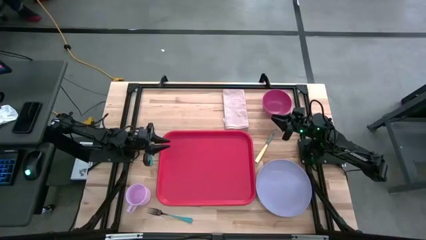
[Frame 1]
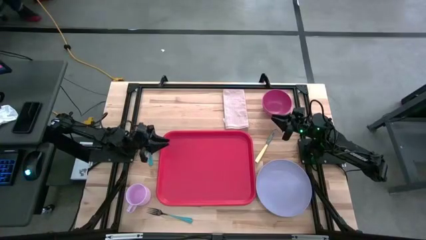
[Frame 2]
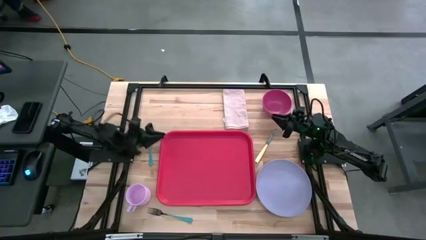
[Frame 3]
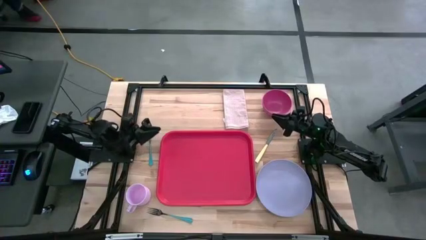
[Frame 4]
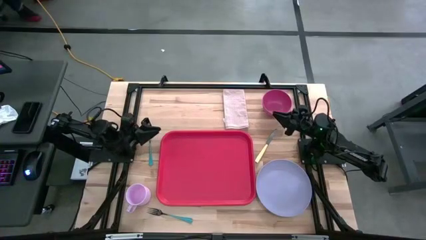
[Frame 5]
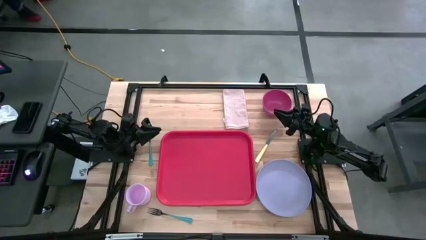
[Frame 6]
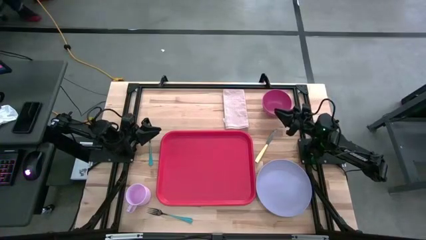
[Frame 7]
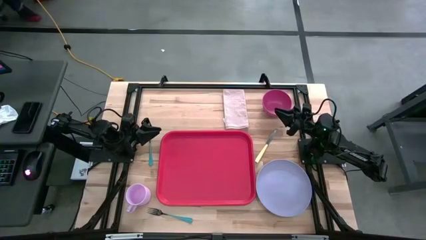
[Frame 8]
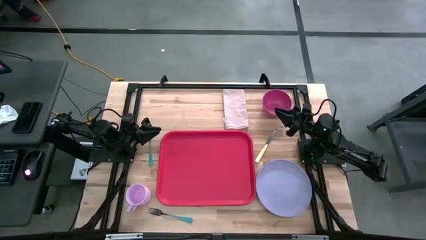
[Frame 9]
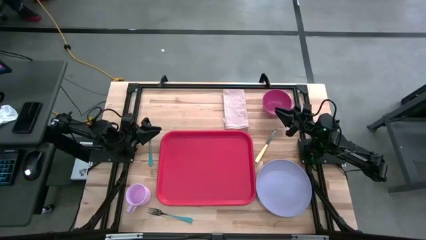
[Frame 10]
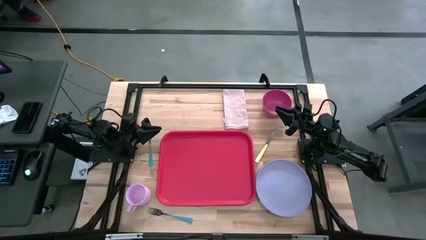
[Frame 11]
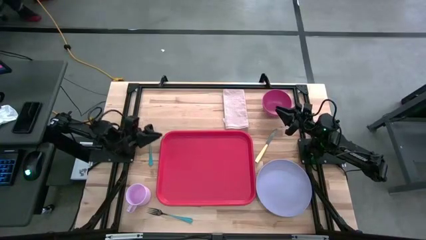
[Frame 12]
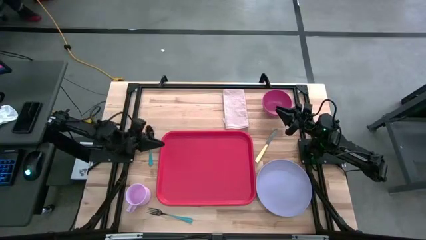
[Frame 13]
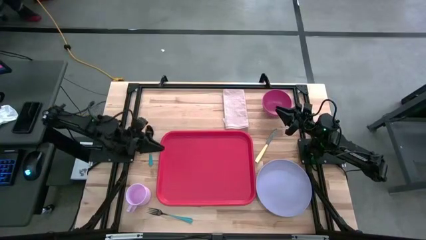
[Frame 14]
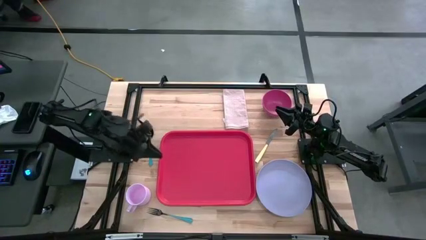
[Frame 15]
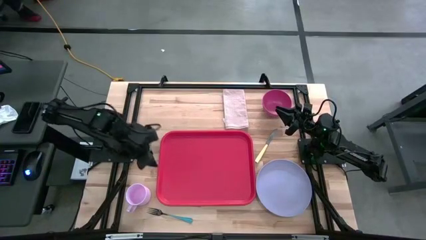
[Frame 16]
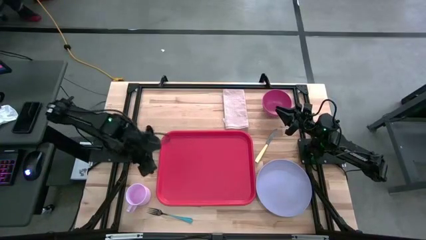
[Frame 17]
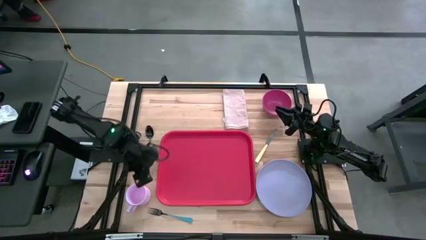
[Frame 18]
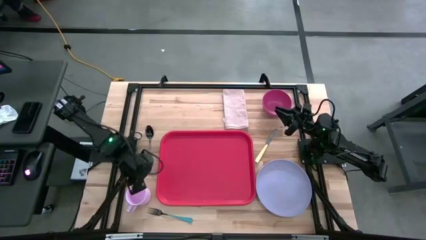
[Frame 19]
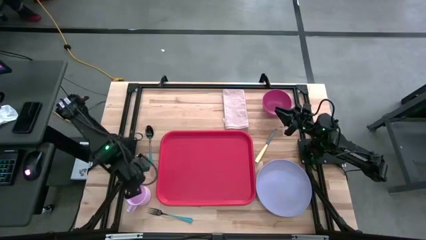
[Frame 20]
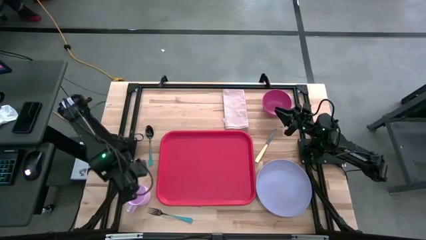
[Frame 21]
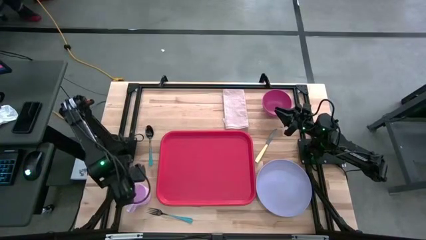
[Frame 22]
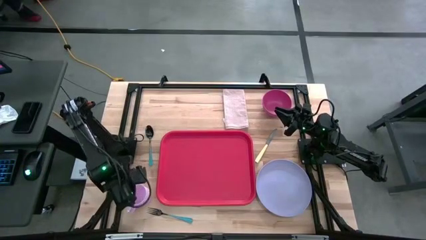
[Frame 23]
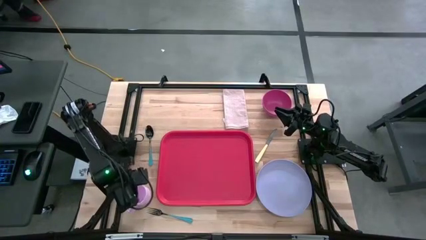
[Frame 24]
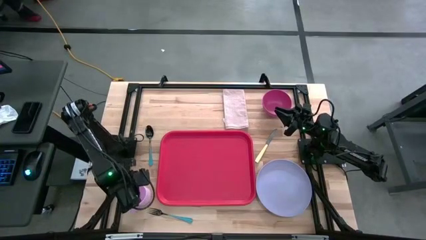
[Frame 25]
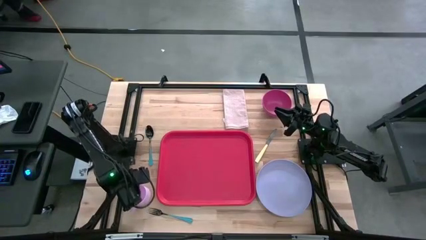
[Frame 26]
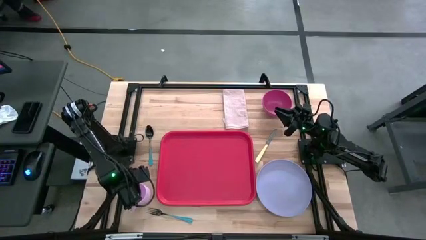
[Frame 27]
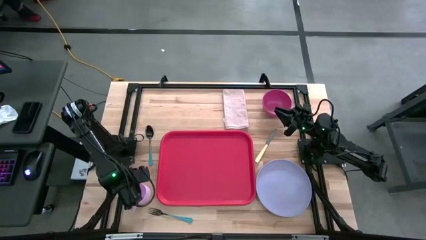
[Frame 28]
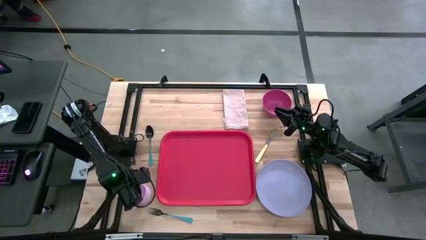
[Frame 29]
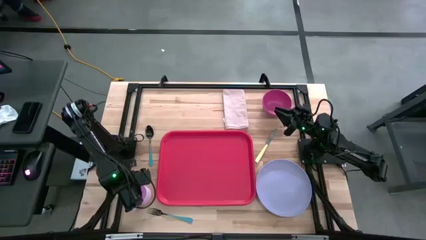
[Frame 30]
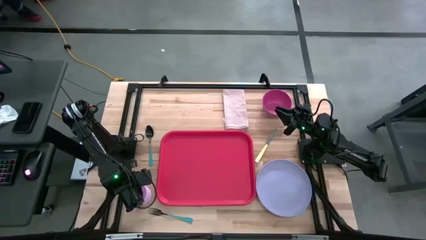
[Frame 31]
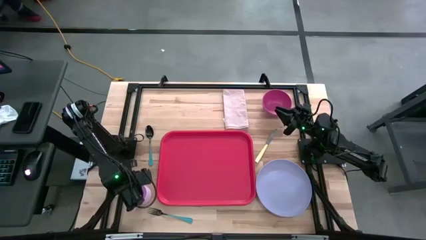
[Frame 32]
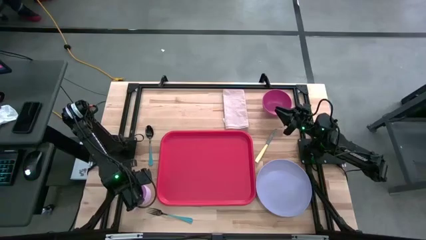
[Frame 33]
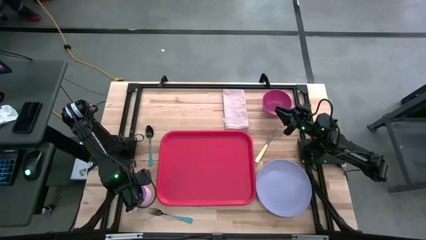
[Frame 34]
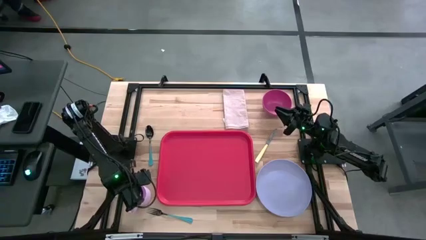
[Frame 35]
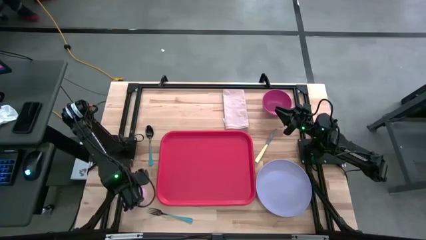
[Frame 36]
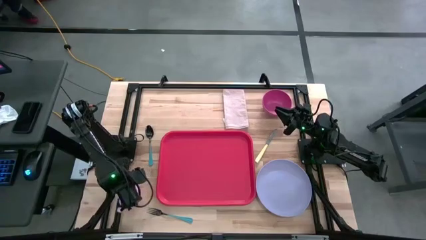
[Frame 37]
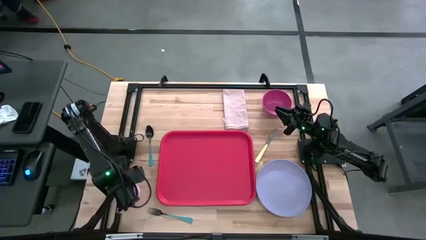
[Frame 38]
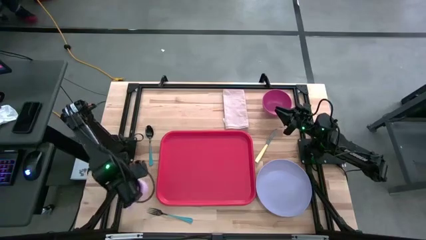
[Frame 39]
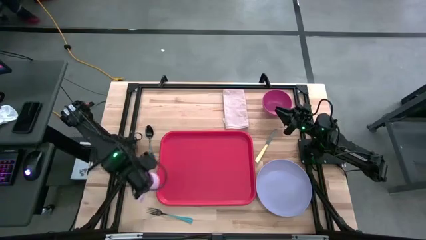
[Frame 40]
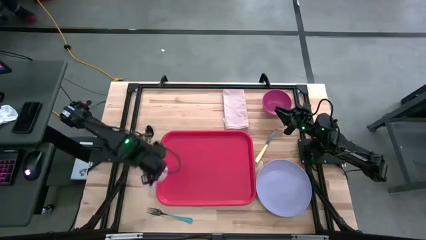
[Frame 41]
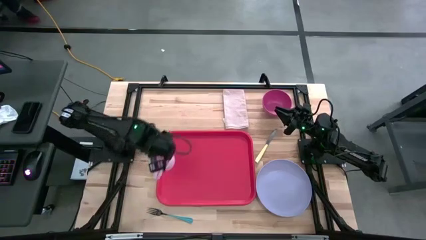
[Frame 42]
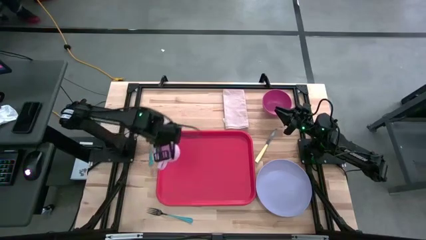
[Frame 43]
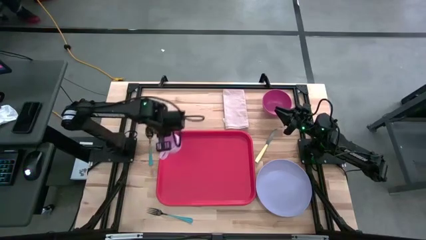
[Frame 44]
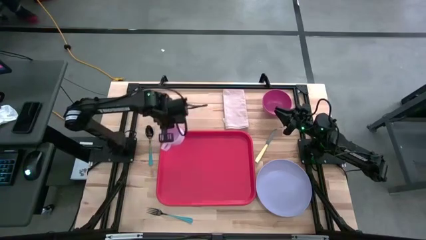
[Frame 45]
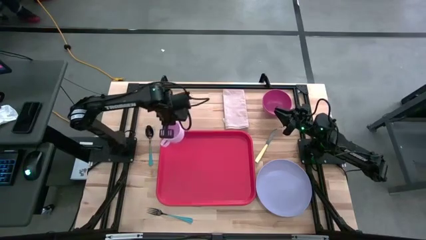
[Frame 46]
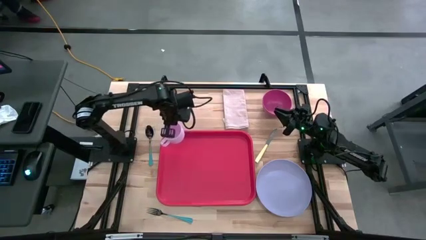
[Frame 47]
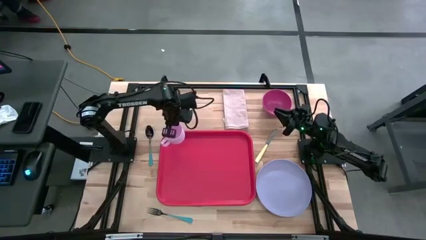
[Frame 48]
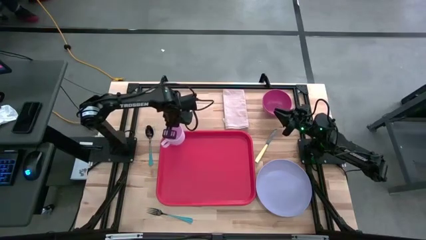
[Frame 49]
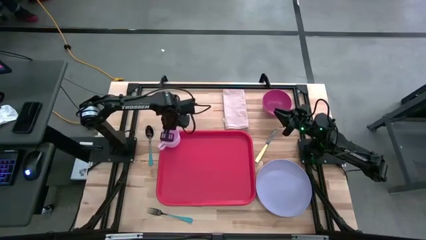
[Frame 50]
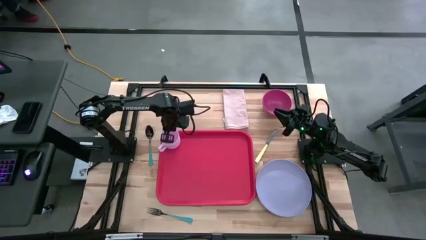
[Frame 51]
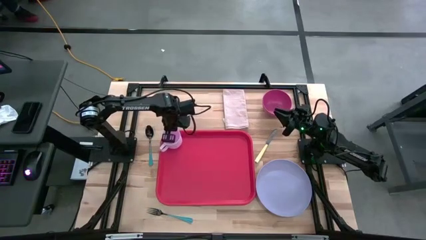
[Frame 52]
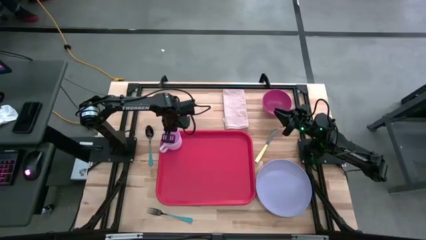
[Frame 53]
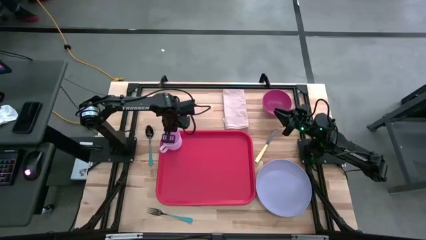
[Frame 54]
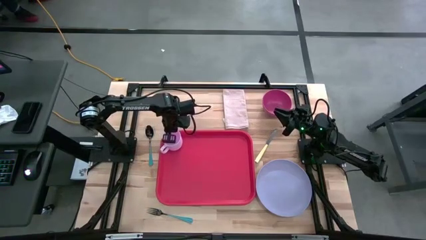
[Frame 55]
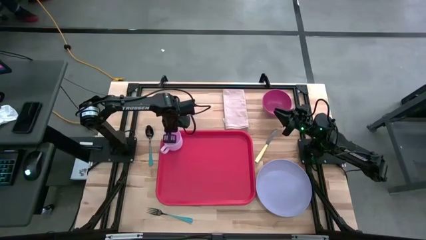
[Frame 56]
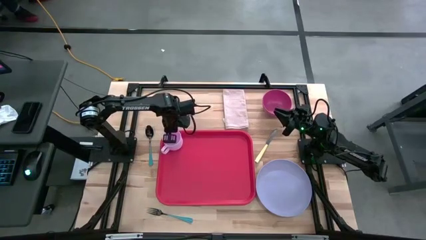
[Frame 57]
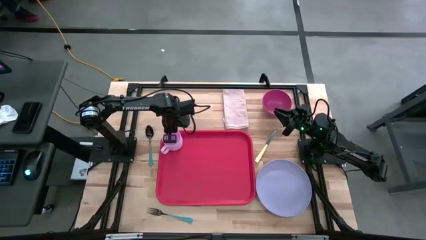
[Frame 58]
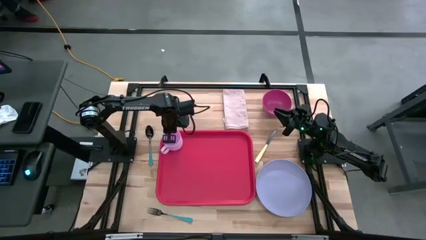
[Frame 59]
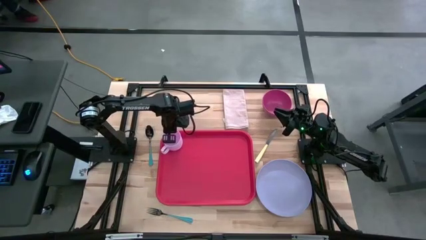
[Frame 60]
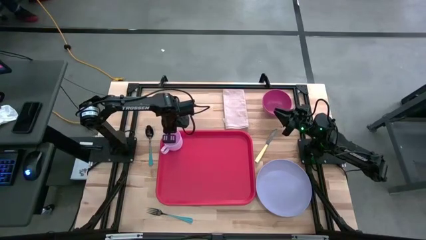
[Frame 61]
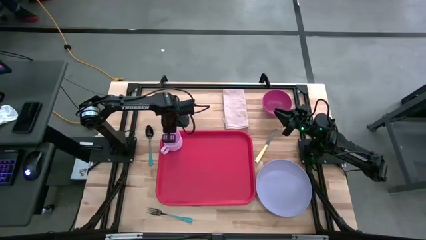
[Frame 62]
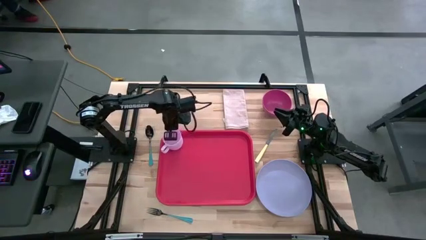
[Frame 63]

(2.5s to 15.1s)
Task: Set up tray
Put the purple mug on the top left of the red serving tray
